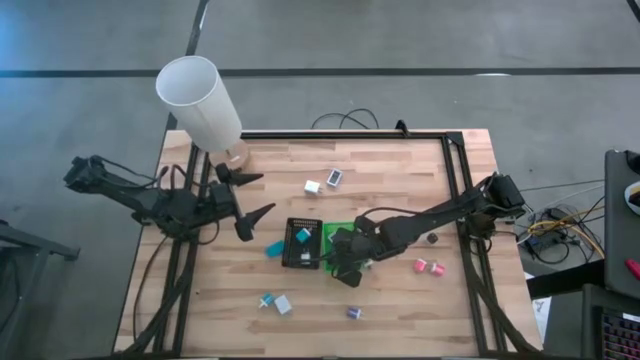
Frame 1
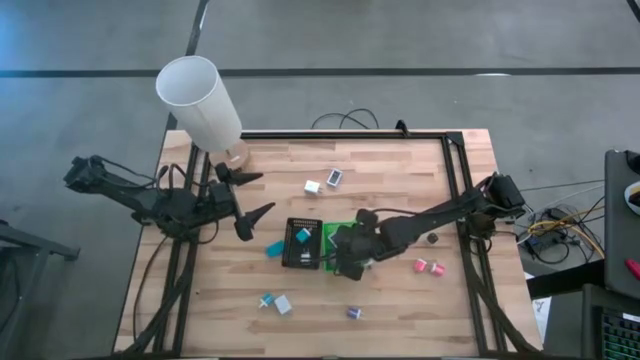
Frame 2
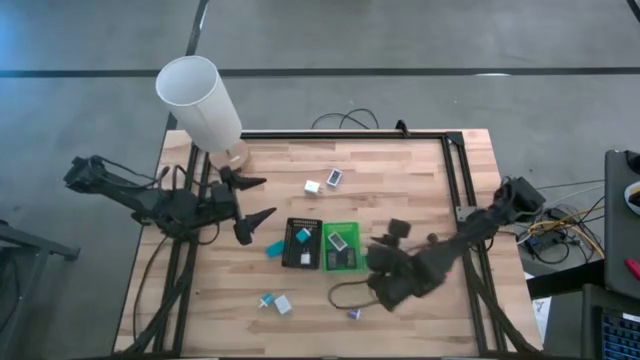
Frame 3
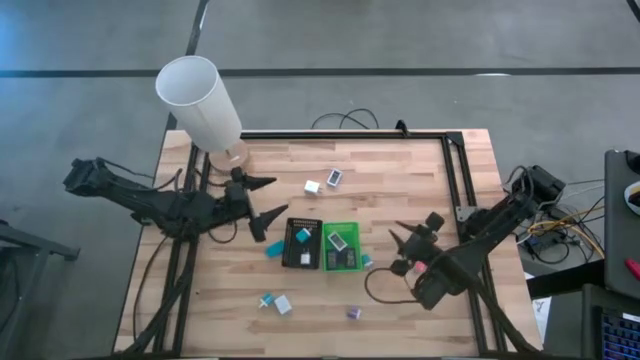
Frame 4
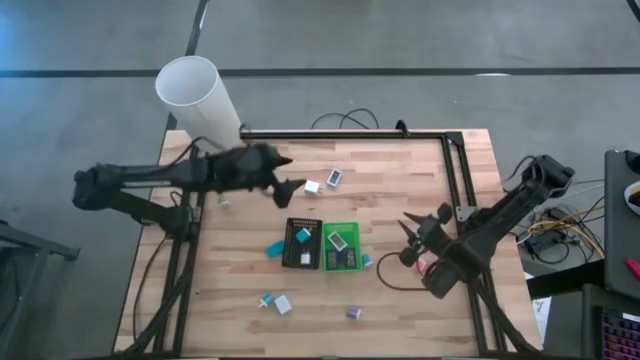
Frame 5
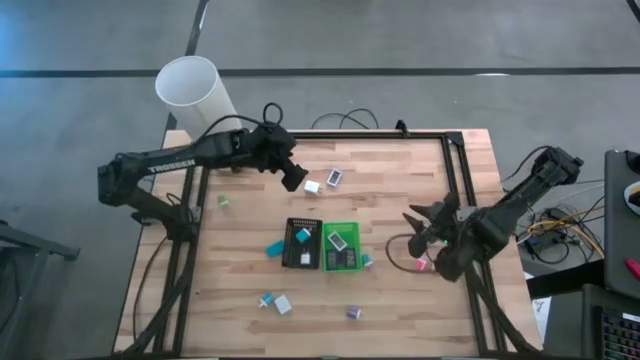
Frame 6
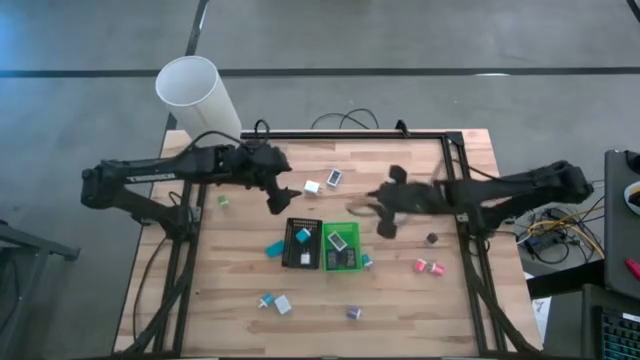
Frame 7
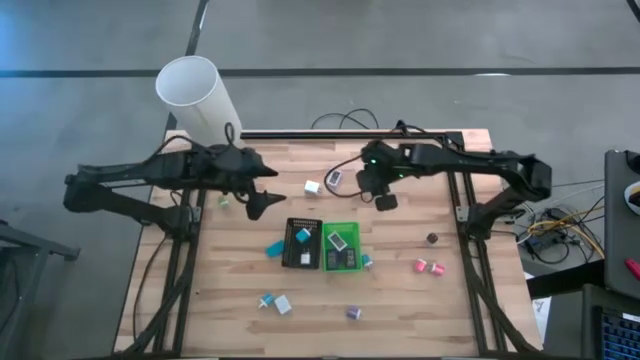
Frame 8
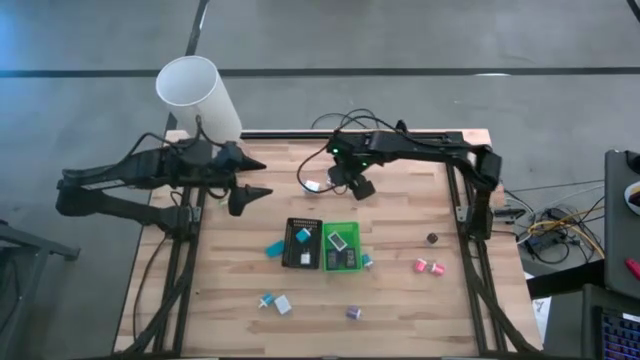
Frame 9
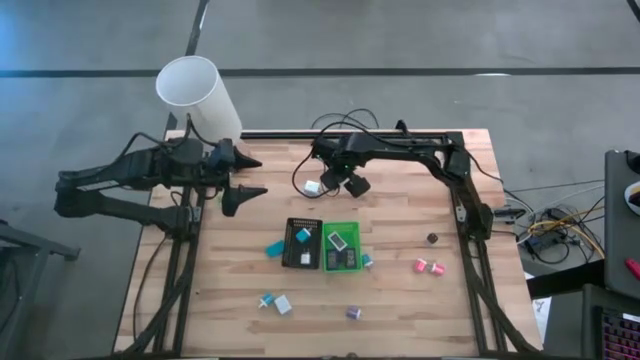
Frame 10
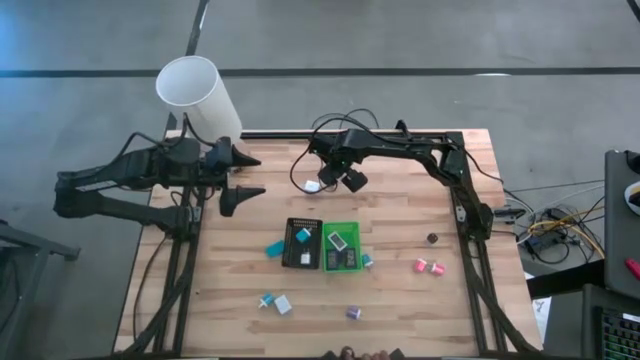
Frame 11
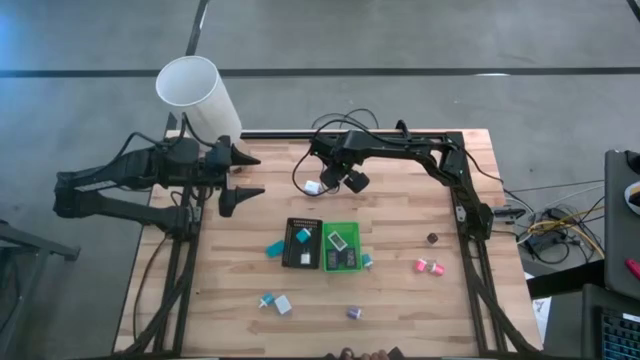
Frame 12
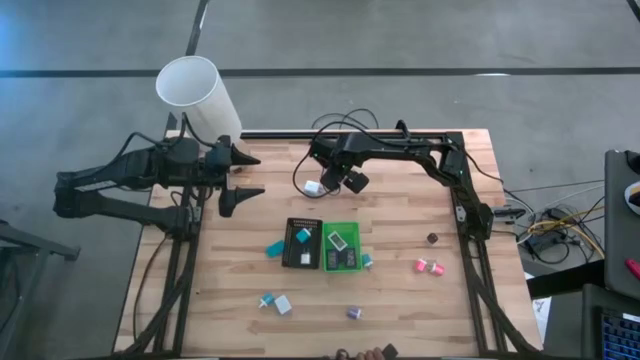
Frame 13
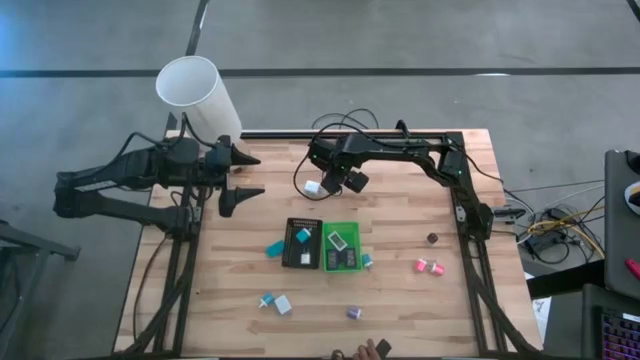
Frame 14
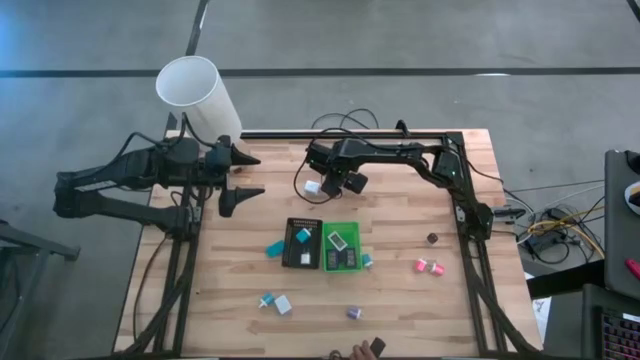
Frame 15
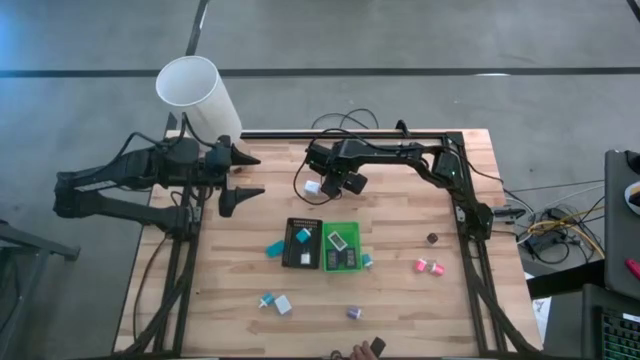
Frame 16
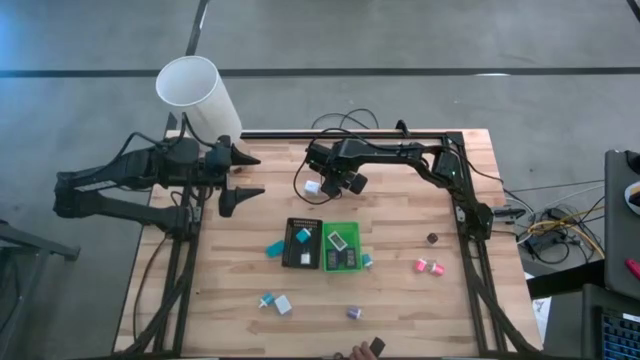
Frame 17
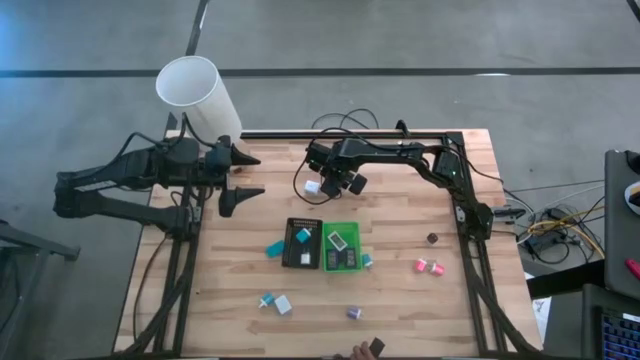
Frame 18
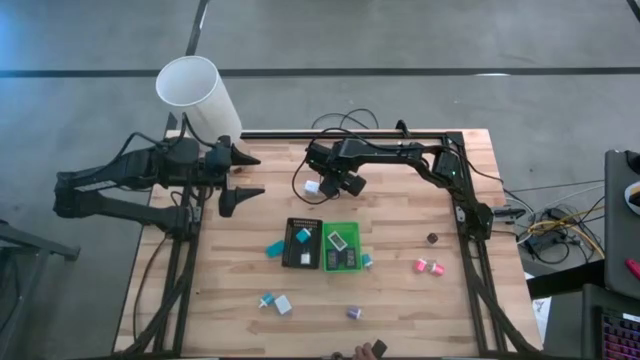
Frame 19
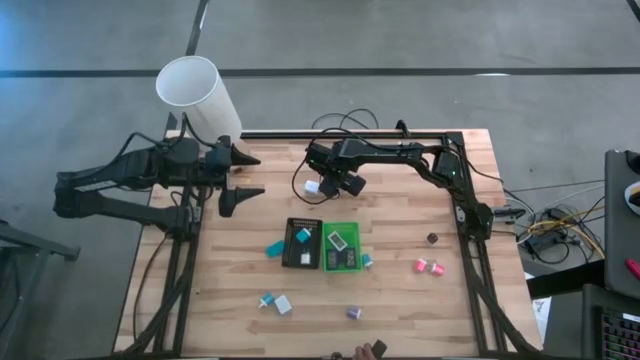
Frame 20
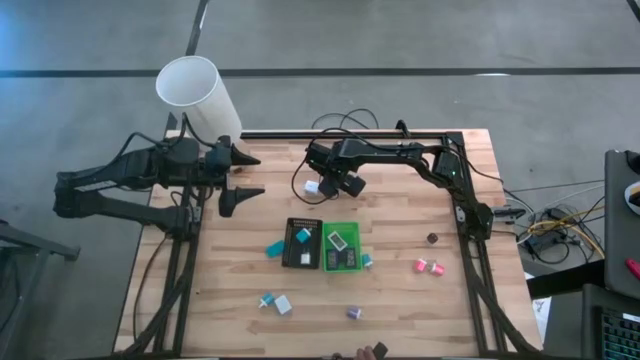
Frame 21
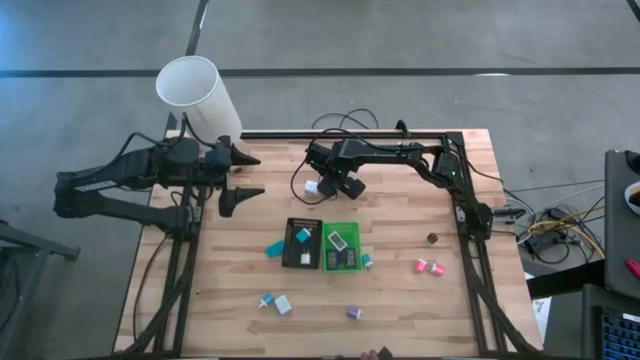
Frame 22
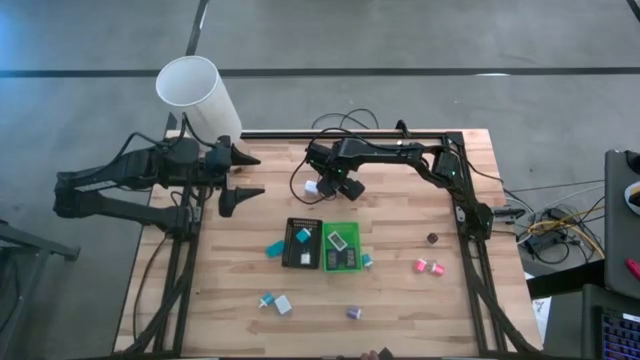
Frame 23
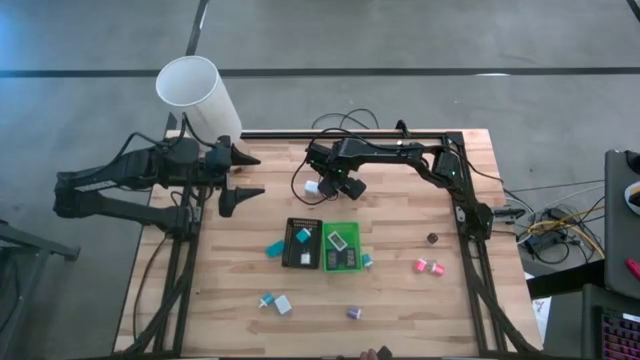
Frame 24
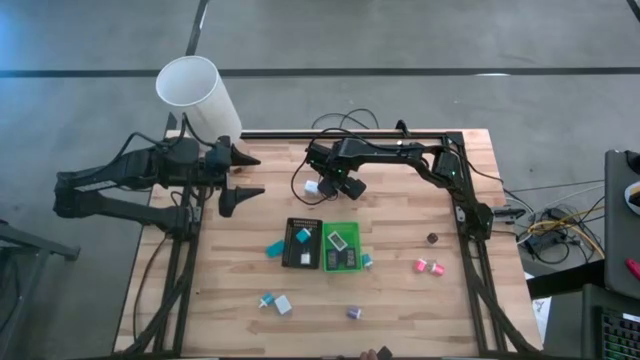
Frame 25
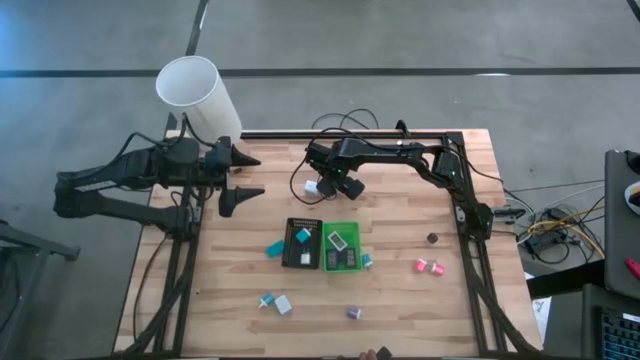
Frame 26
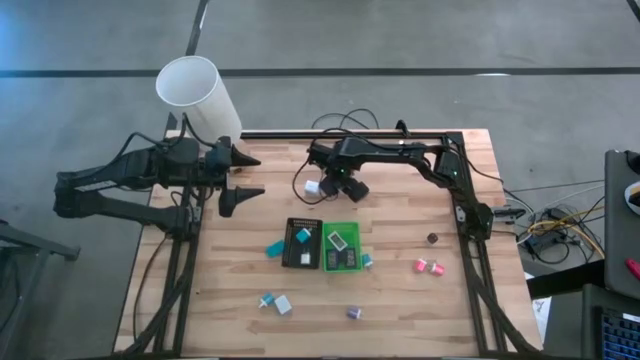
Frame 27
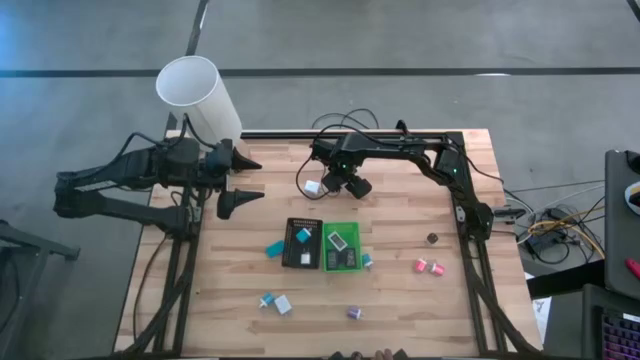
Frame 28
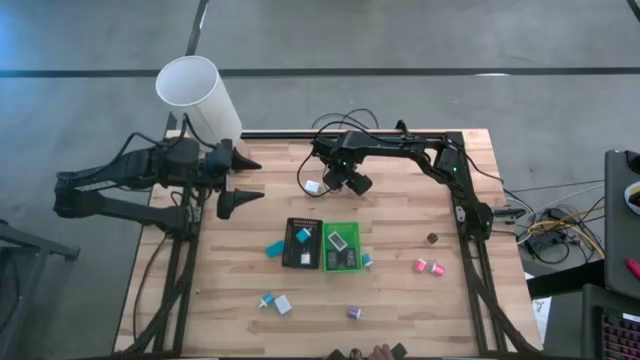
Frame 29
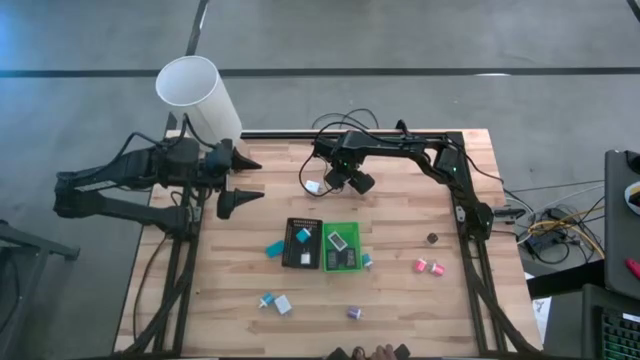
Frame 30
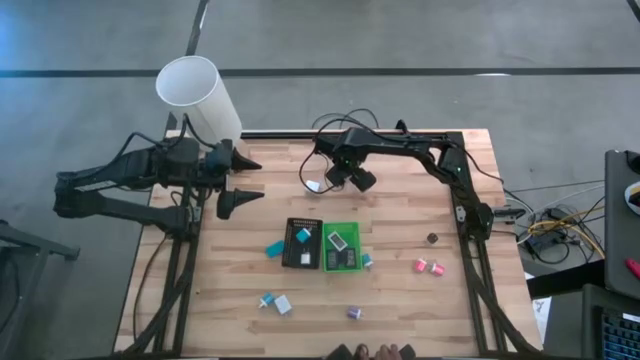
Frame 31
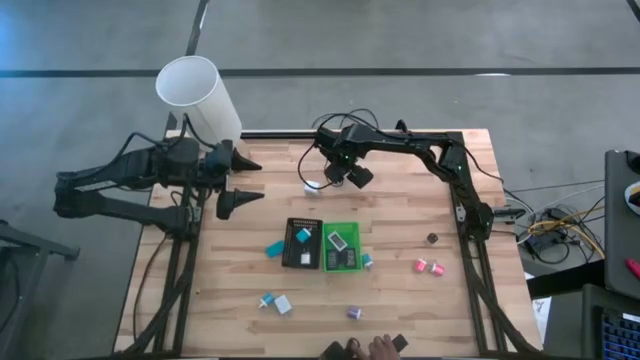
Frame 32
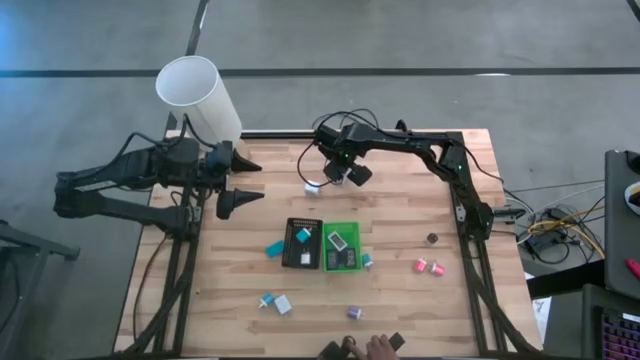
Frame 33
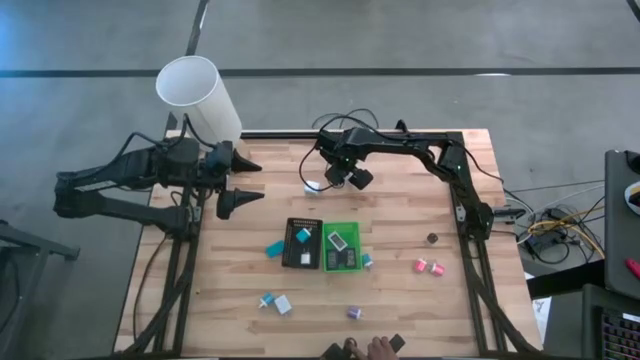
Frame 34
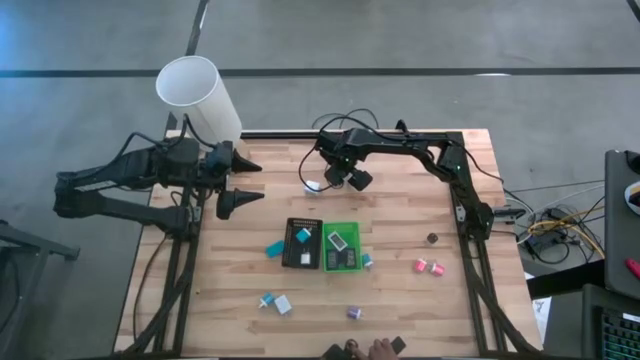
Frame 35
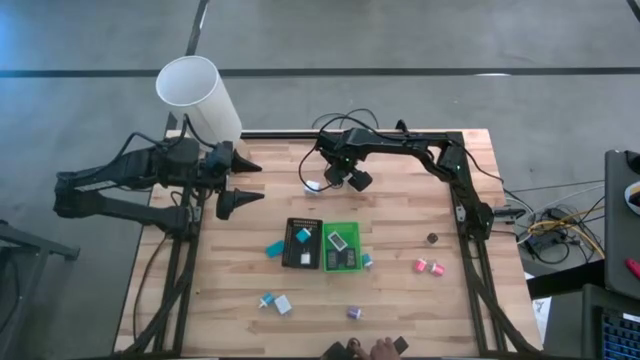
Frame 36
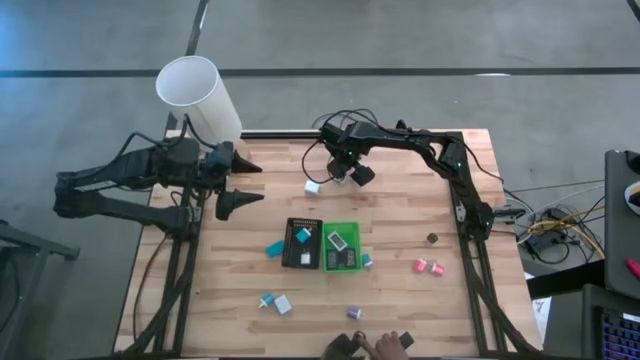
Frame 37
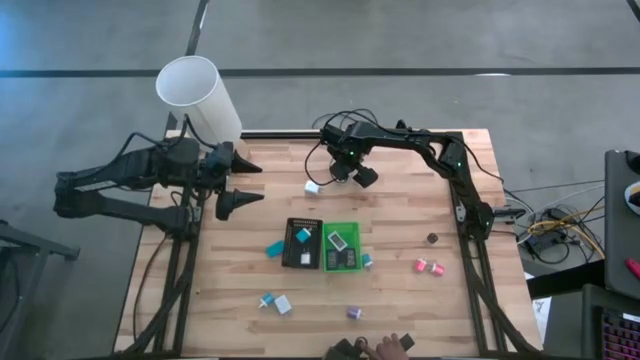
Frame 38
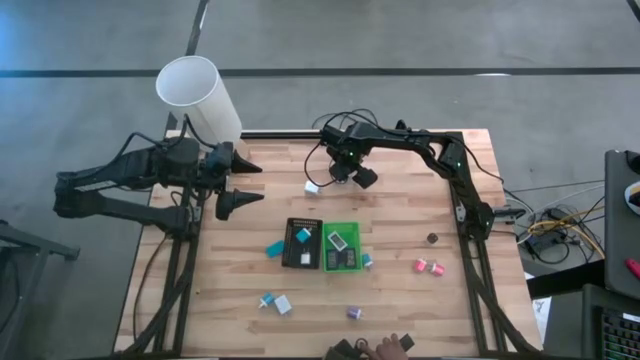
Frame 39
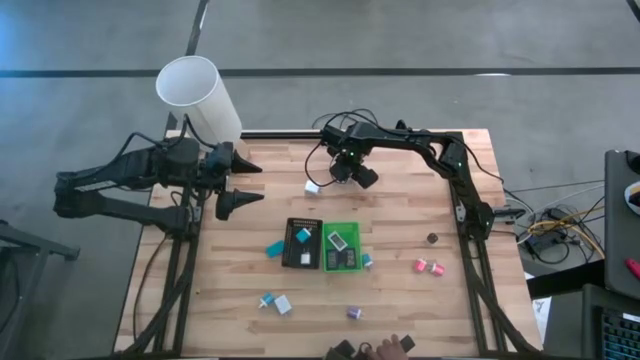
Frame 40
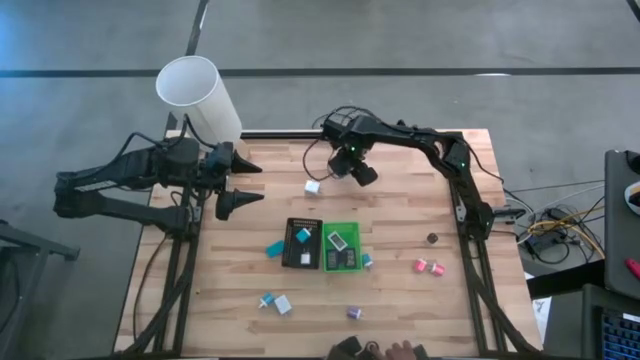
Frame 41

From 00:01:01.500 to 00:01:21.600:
Task: Pick & Place Office items
Put the white timer into the green bin
